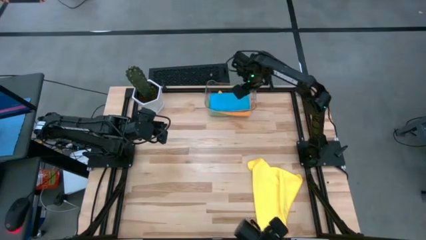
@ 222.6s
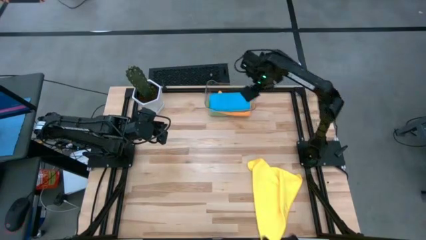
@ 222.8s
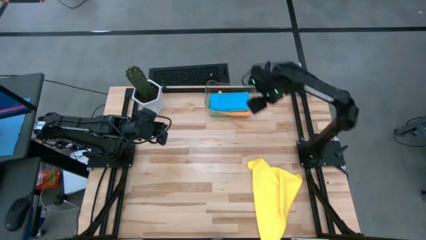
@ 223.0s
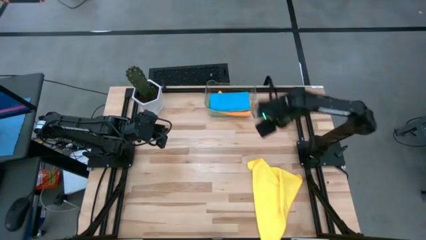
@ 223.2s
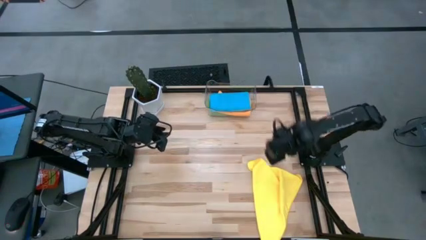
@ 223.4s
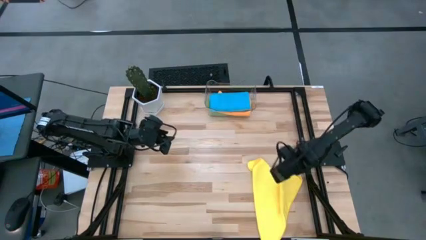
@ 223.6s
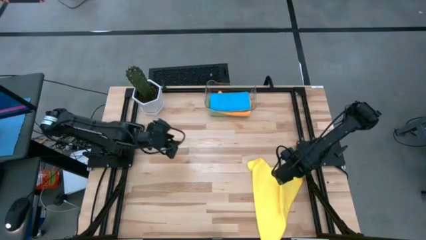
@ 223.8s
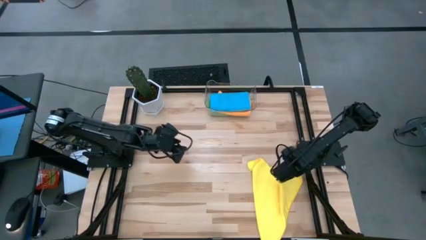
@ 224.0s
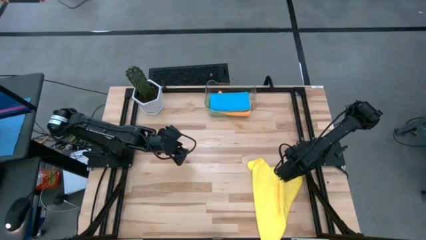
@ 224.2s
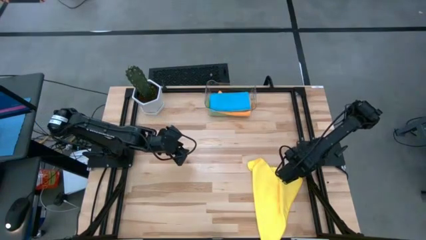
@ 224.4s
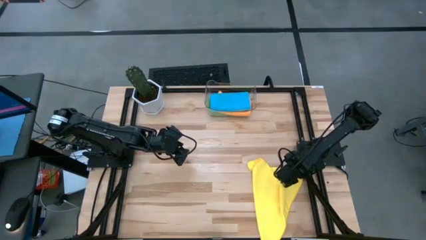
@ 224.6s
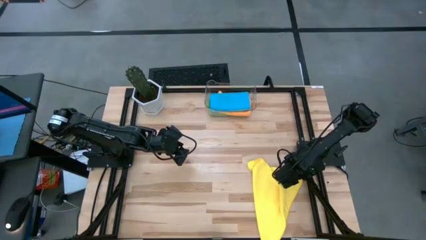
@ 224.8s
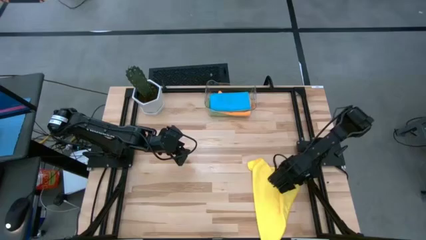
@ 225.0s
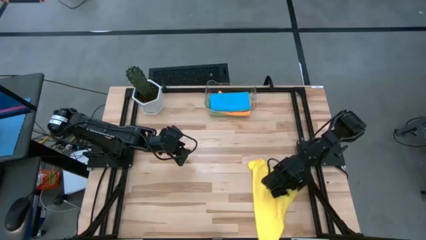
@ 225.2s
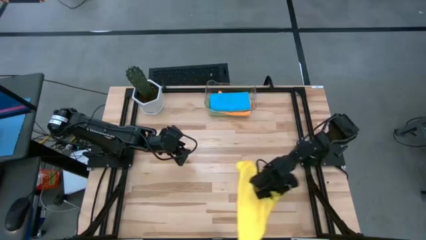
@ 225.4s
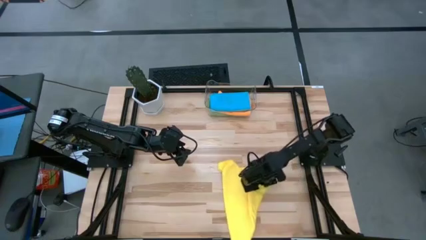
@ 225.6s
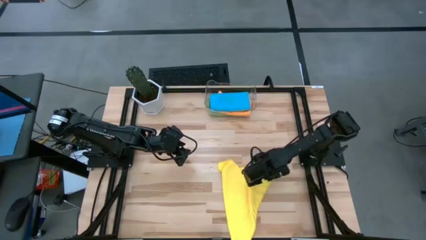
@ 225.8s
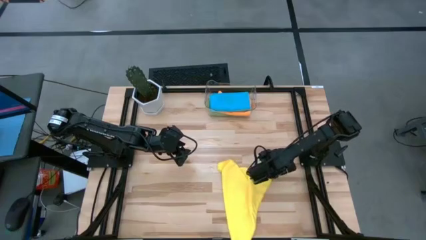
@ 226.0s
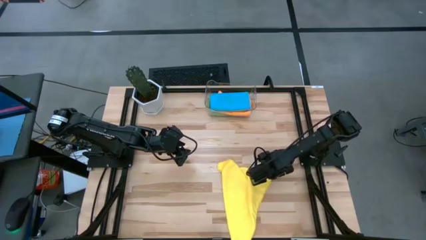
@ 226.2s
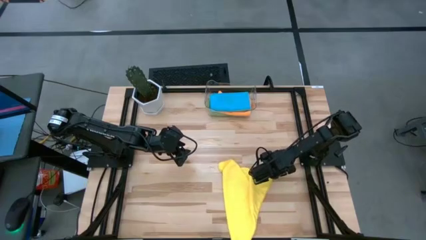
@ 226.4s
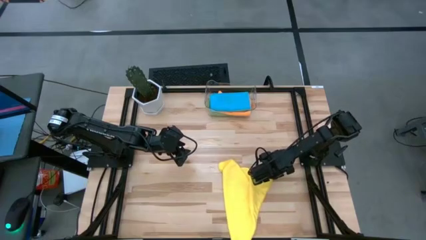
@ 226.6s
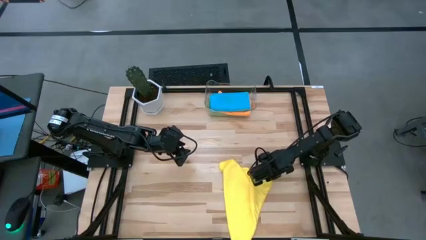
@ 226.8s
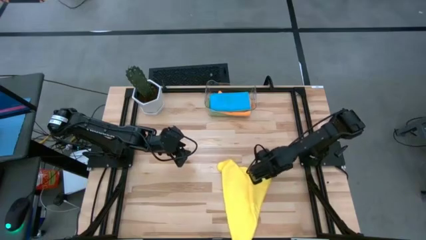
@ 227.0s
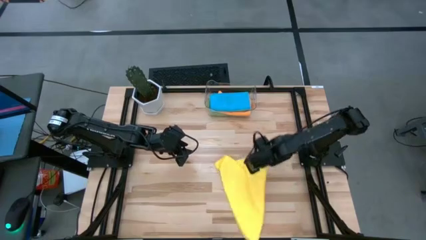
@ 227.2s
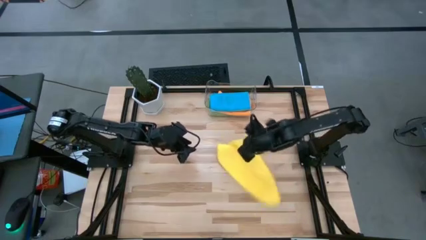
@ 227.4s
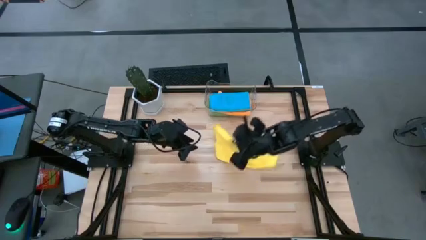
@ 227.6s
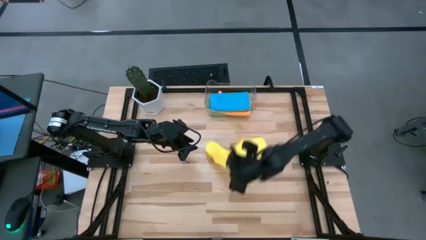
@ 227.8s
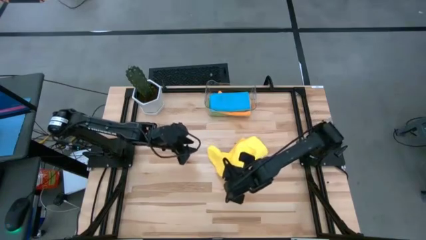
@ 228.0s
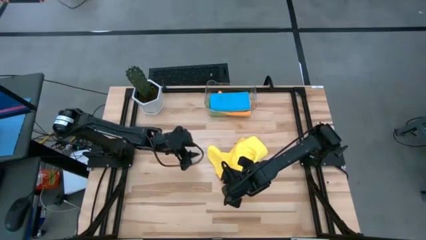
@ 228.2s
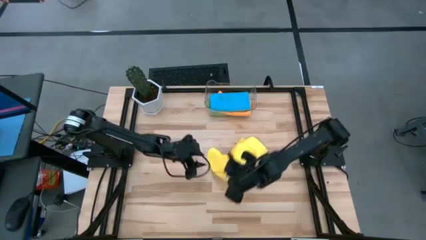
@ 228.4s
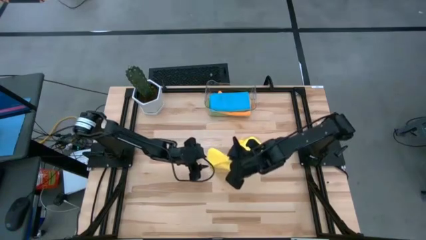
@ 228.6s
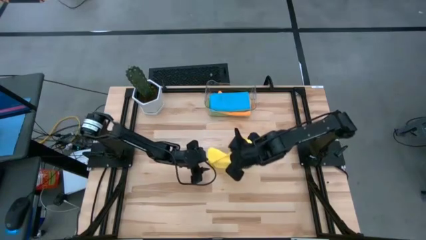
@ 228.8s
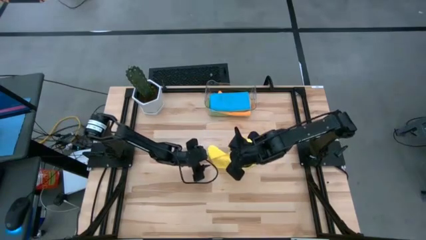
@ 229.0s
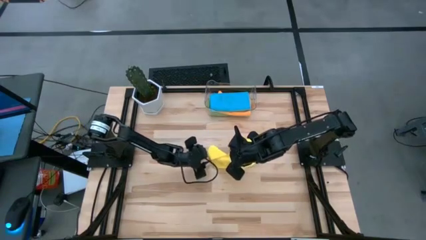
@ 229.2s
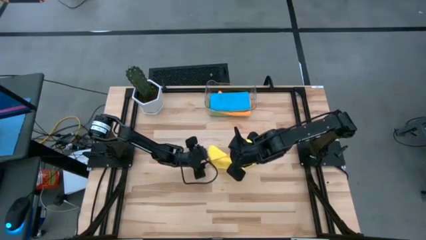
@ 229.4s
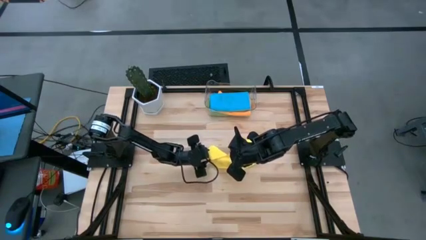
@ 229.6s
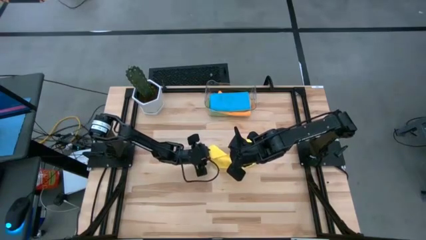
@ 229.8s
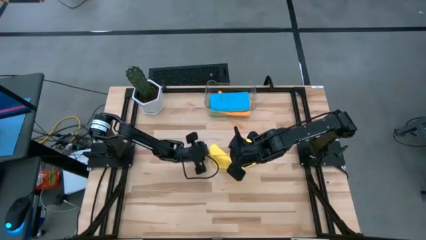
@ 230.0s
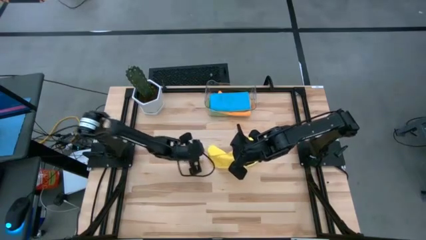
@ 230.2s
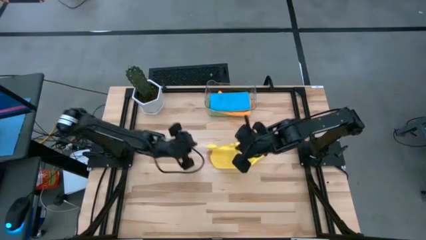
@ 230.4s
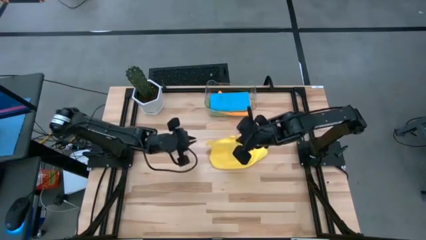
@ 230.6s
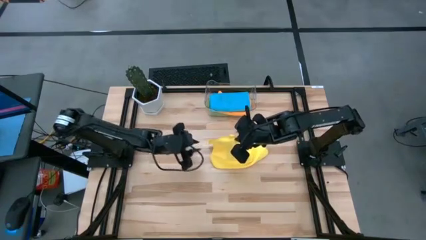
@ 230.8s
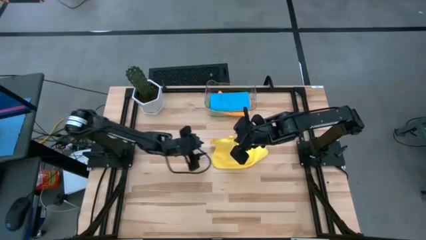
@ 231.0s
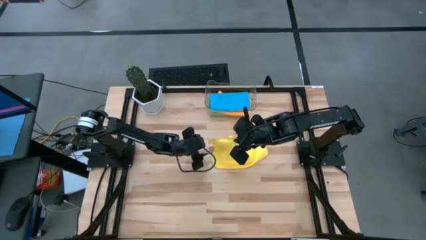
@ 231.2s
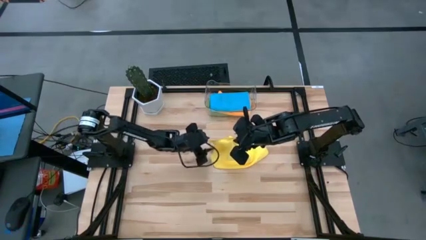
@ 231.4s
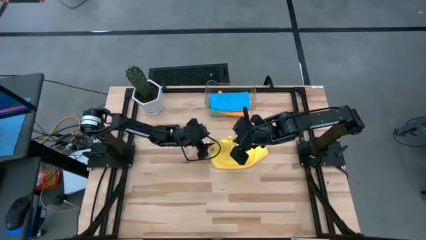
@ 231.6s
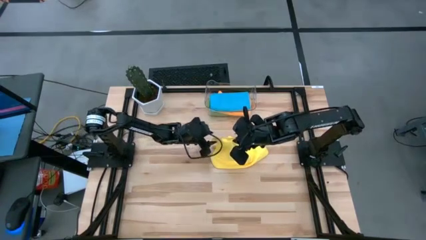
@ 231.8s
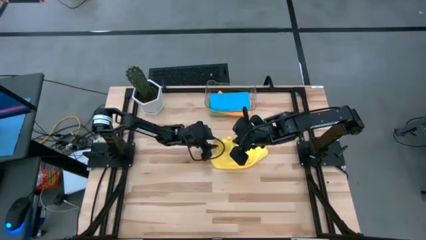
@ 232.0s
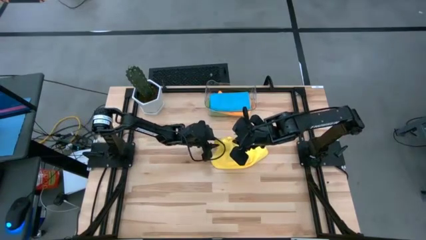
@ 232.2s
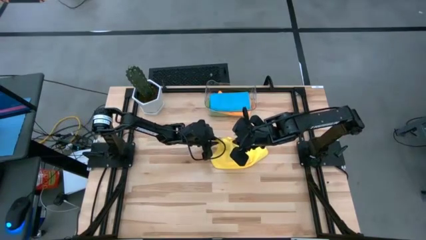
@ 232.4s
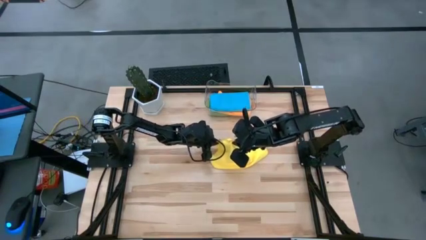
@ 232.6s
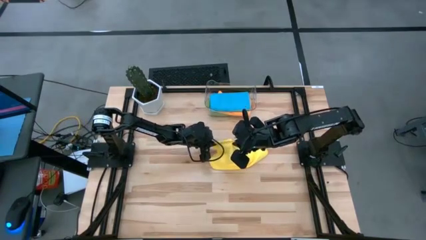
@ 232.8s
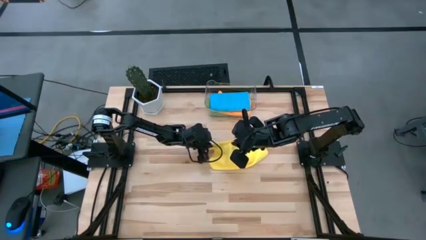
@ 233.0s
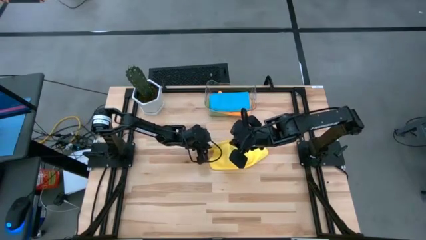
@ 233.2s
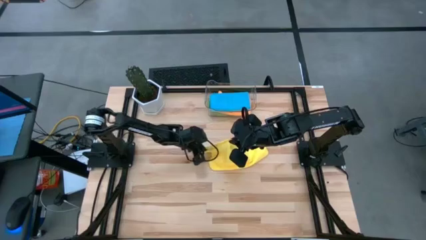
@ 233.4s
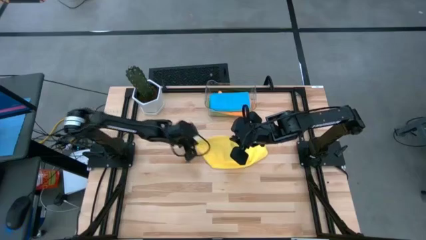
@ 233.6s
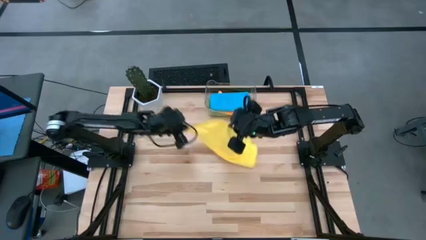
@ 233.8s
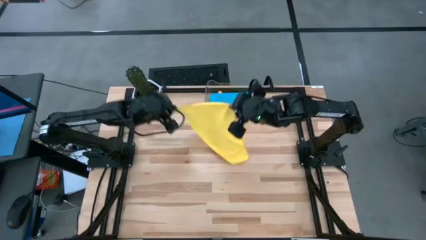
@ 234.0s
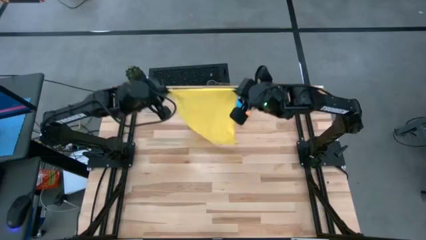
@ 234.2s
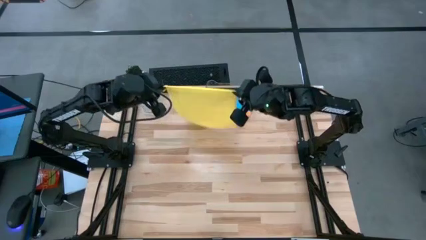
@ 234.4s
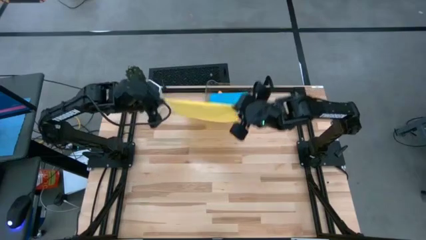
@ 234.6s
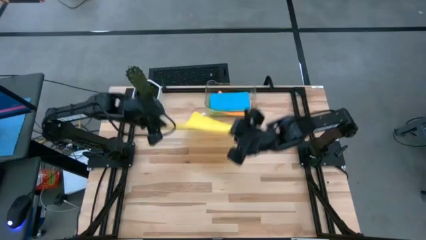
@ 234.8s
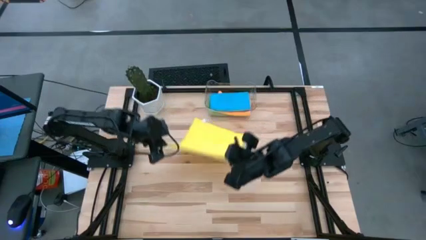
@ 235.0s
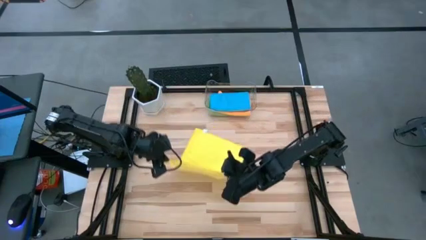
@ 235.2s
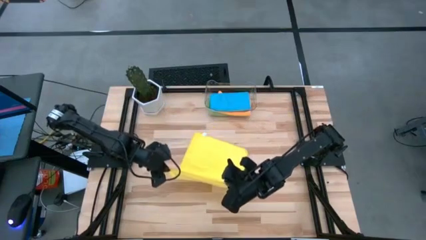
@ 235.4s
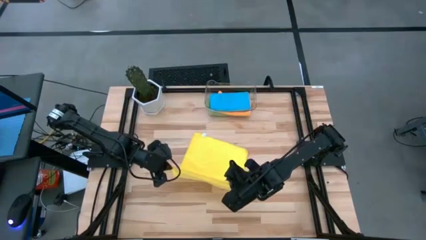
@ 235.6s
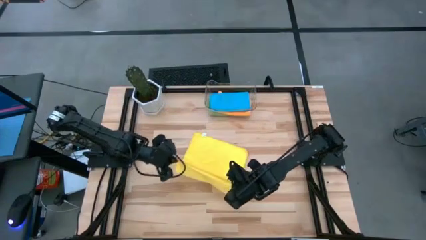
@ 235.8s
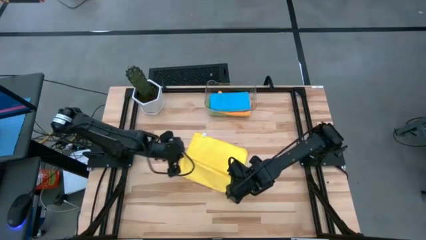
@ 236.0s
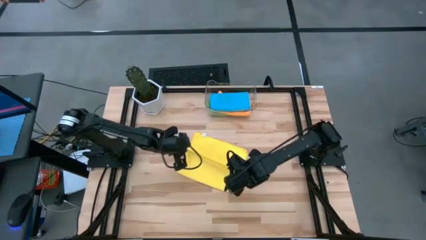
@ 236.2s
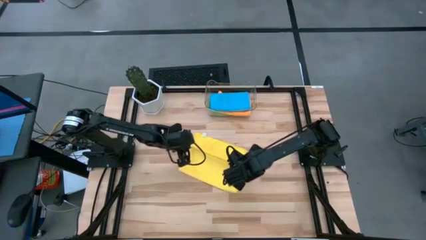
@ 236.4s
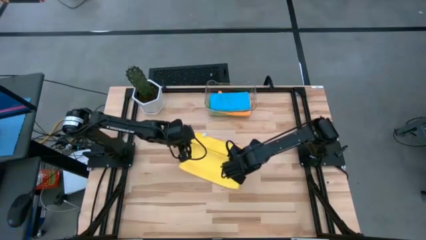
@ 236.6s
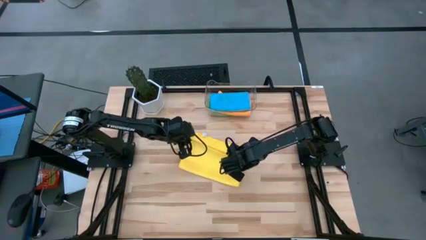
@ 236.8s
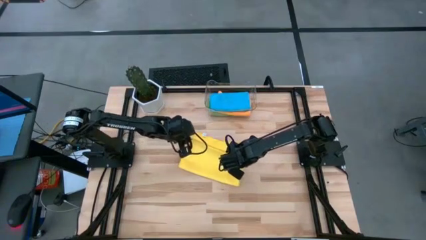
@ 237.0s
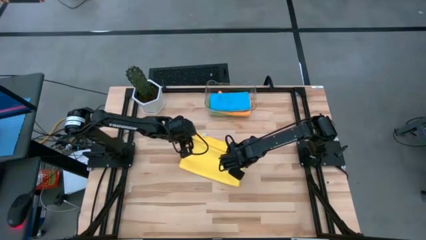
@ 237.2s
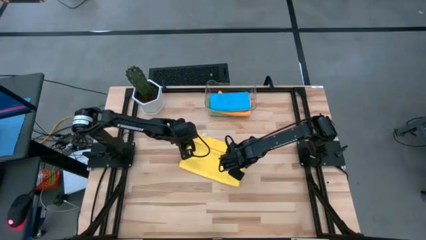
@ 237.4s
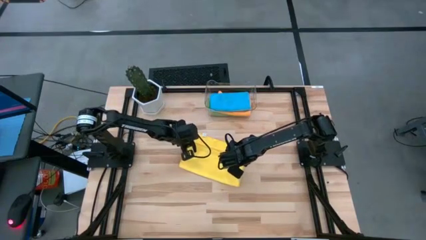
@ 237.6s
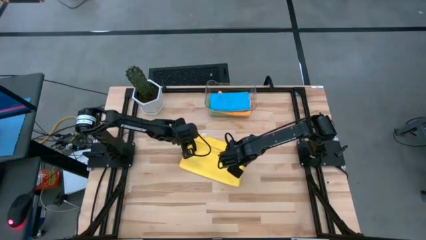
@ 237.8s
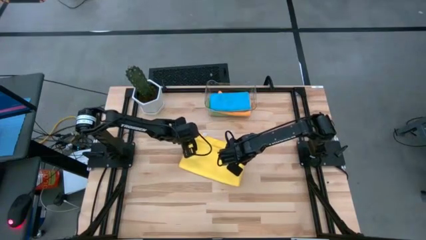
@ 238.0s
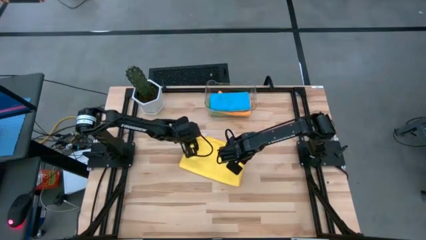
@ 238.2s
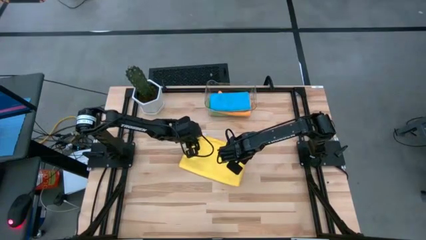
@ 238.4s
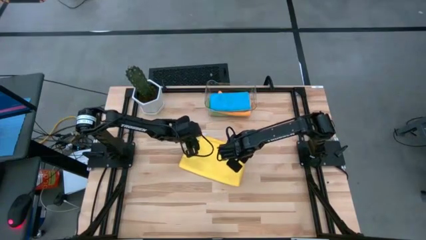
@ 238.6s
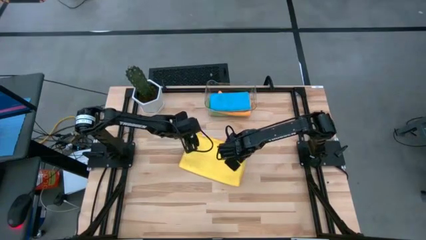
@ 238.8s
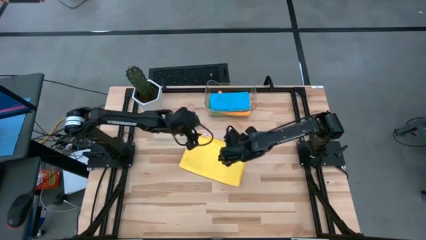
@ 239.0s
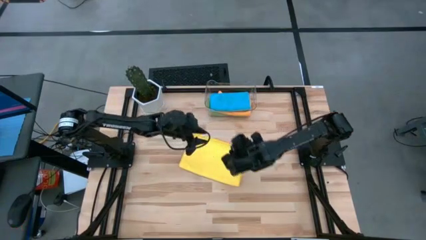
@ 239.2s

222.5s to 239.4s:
Task: Fold microfiber towels
Fold the yellow towel
